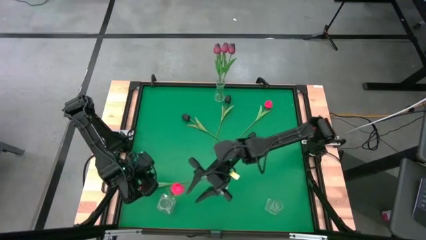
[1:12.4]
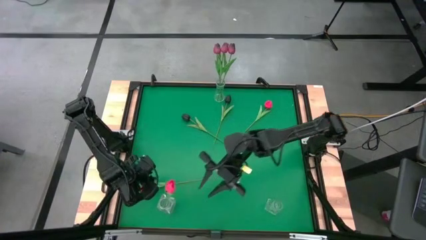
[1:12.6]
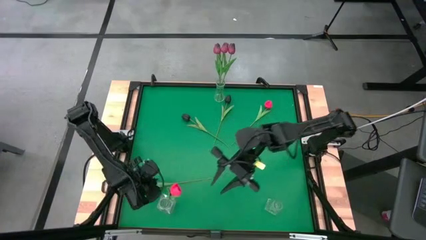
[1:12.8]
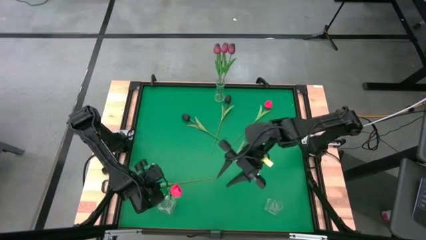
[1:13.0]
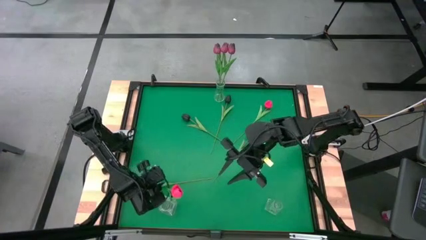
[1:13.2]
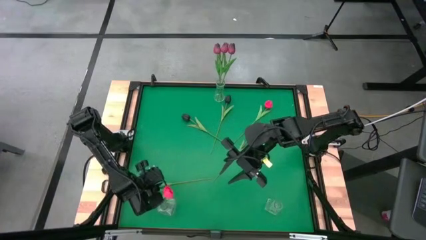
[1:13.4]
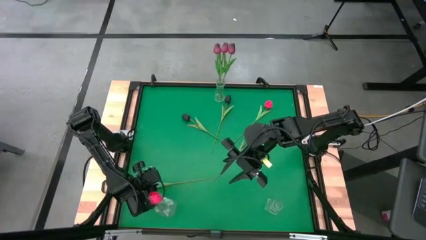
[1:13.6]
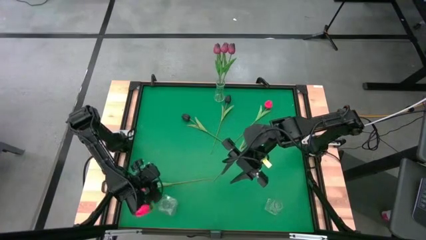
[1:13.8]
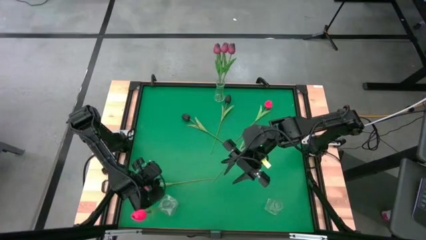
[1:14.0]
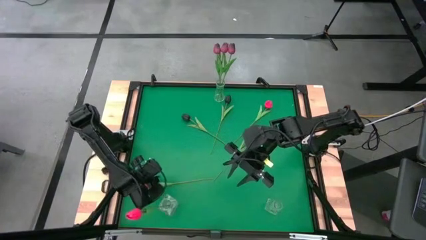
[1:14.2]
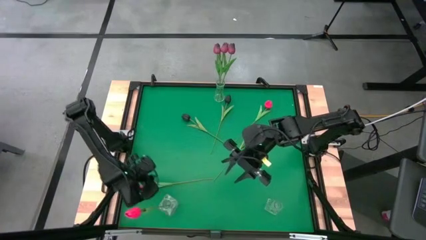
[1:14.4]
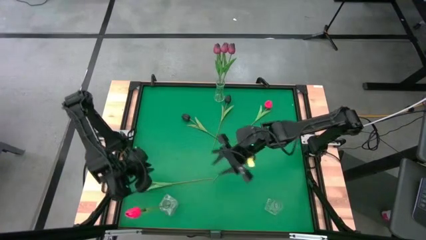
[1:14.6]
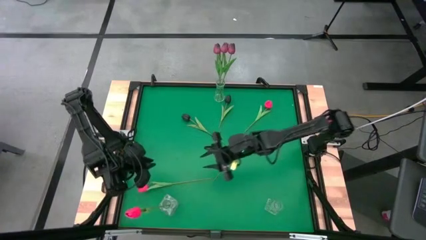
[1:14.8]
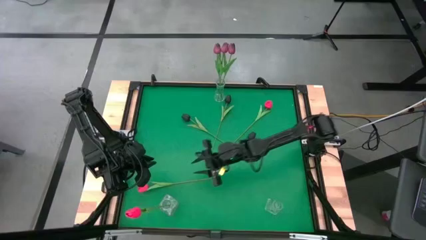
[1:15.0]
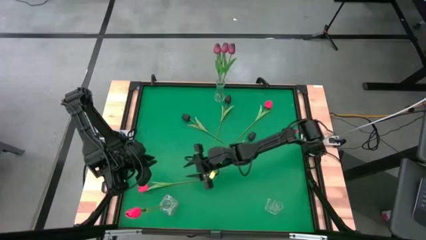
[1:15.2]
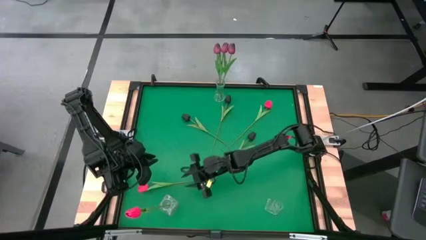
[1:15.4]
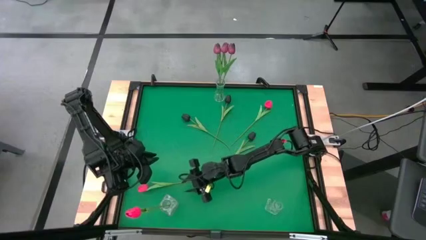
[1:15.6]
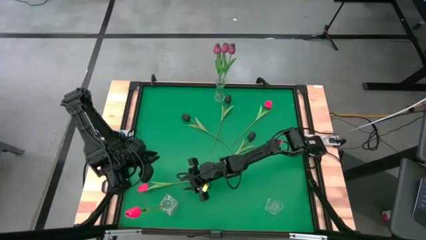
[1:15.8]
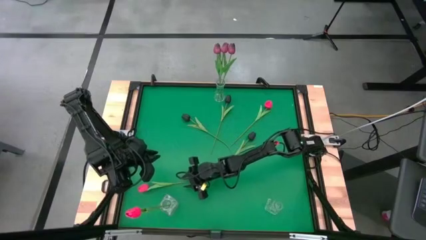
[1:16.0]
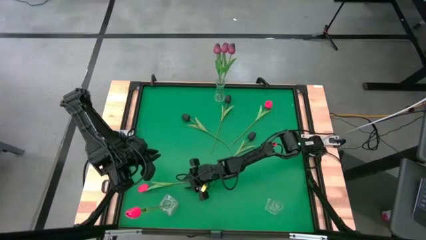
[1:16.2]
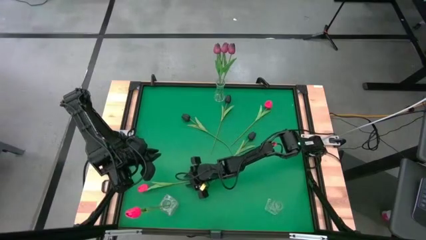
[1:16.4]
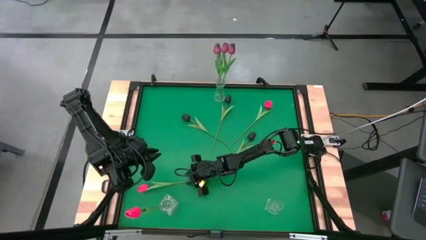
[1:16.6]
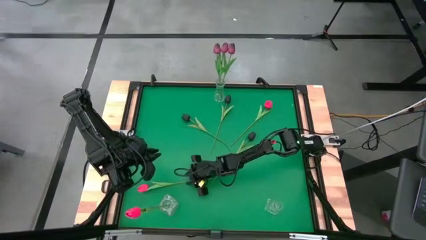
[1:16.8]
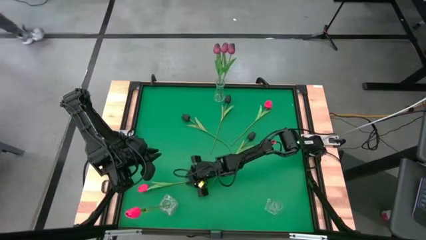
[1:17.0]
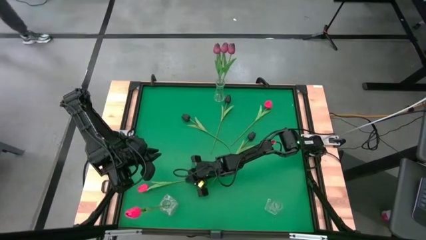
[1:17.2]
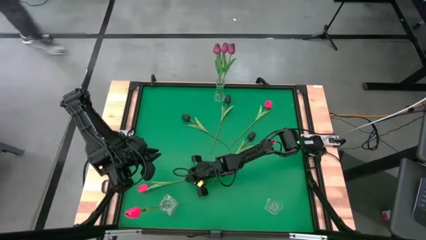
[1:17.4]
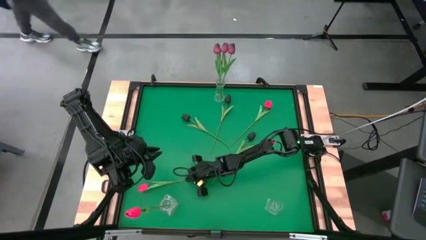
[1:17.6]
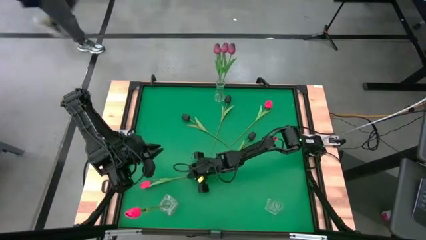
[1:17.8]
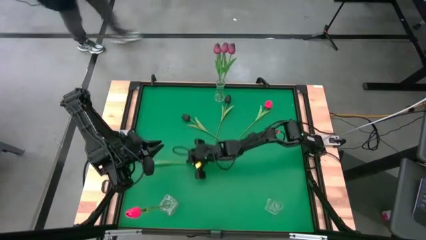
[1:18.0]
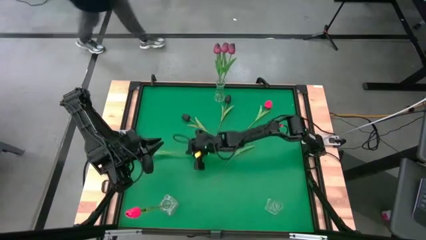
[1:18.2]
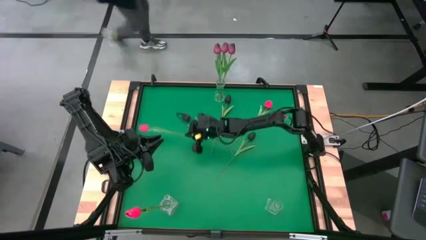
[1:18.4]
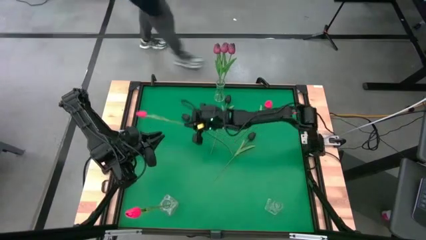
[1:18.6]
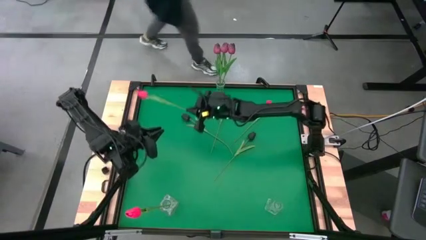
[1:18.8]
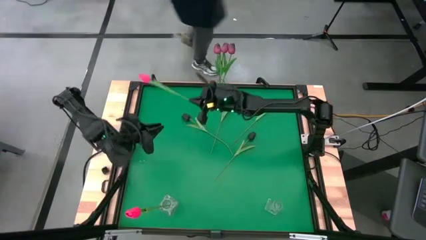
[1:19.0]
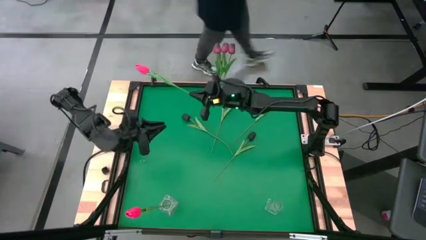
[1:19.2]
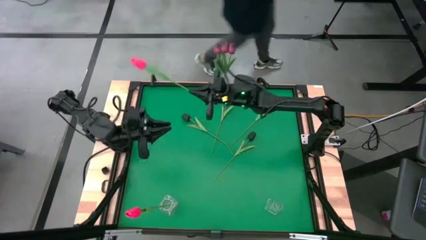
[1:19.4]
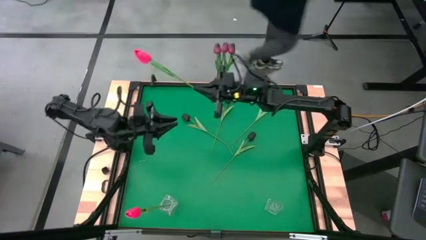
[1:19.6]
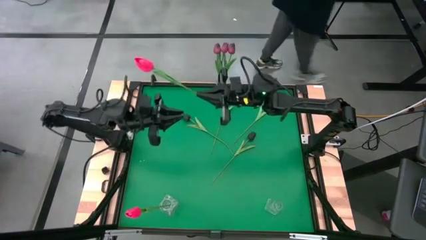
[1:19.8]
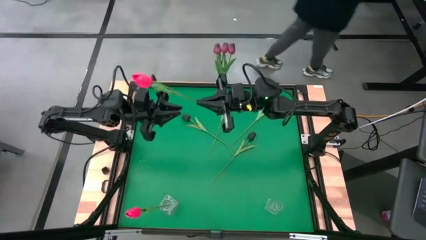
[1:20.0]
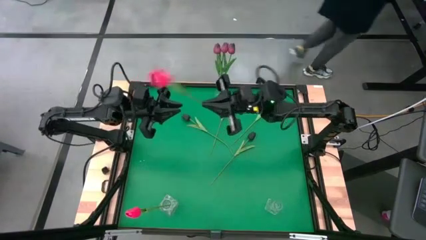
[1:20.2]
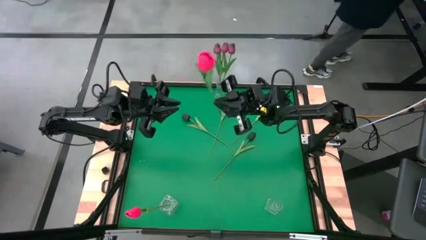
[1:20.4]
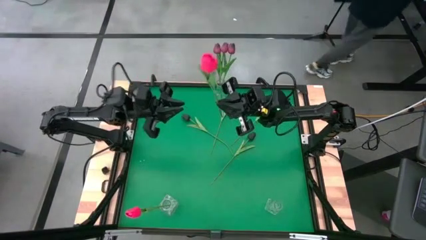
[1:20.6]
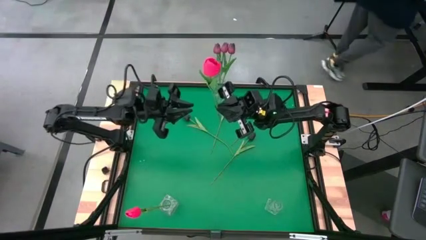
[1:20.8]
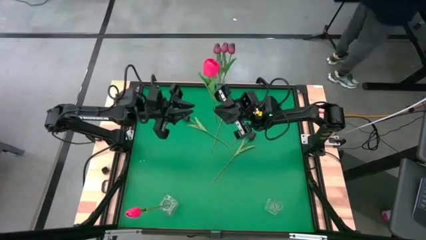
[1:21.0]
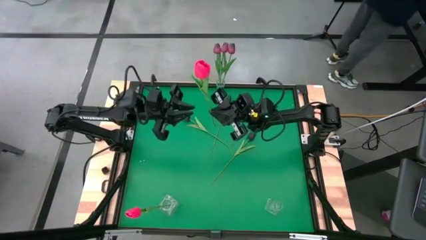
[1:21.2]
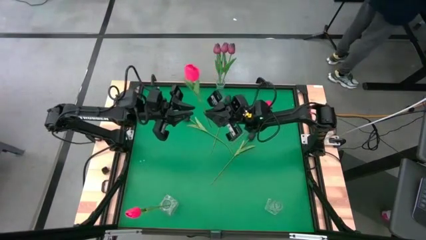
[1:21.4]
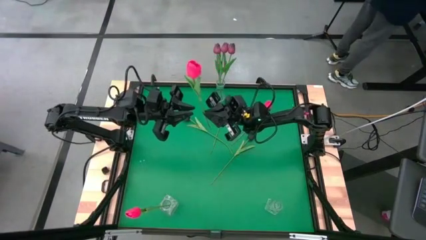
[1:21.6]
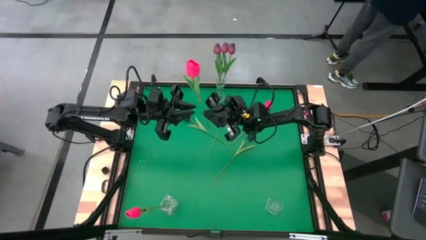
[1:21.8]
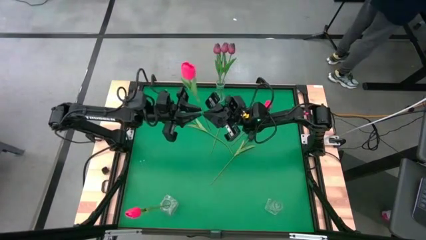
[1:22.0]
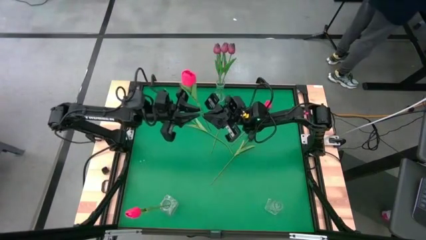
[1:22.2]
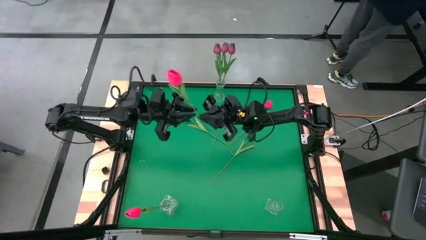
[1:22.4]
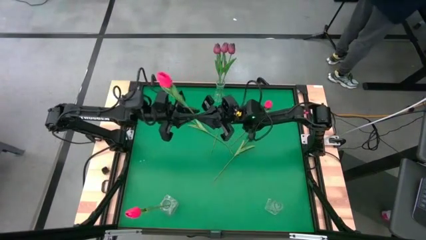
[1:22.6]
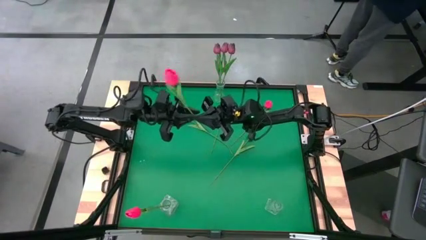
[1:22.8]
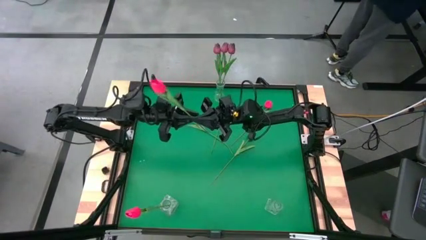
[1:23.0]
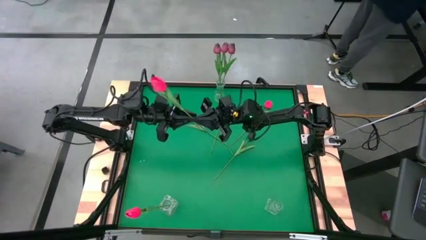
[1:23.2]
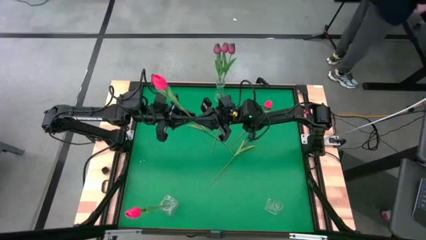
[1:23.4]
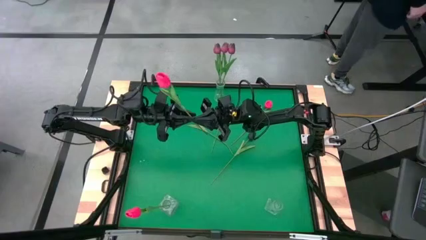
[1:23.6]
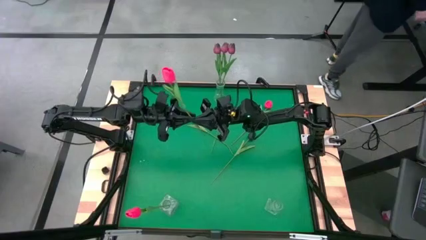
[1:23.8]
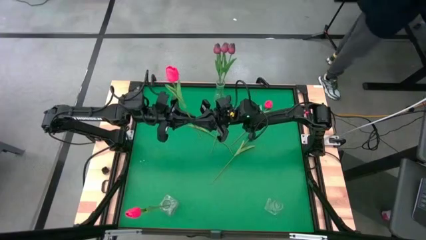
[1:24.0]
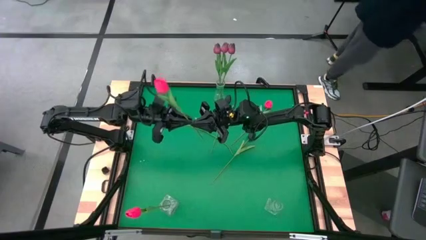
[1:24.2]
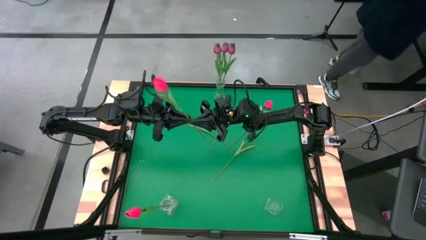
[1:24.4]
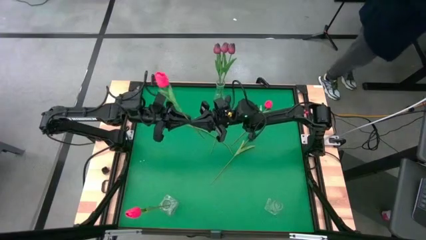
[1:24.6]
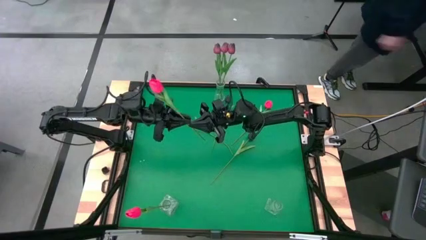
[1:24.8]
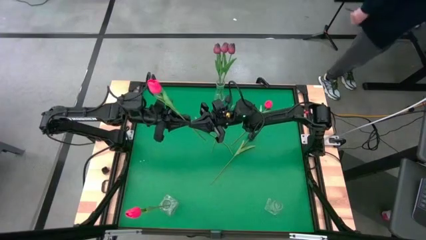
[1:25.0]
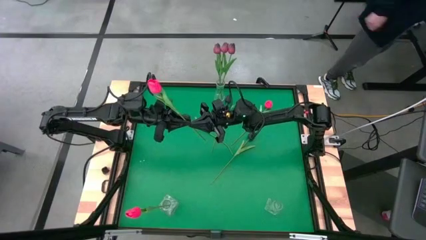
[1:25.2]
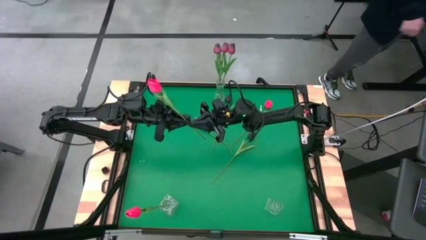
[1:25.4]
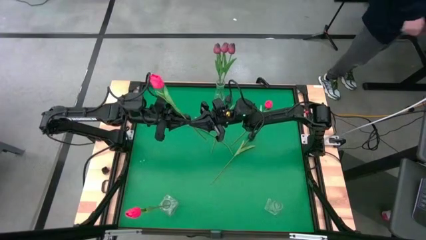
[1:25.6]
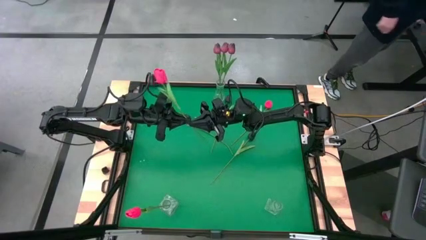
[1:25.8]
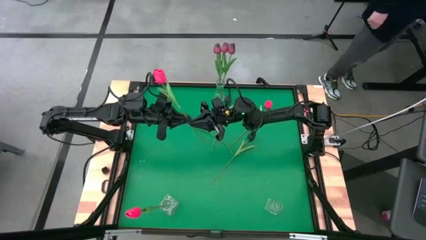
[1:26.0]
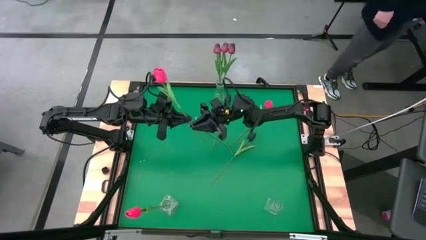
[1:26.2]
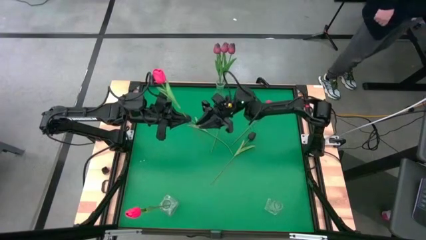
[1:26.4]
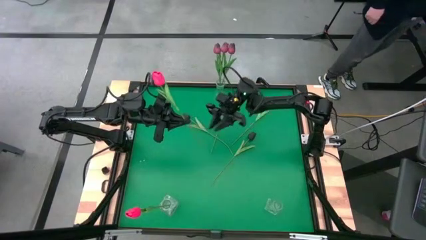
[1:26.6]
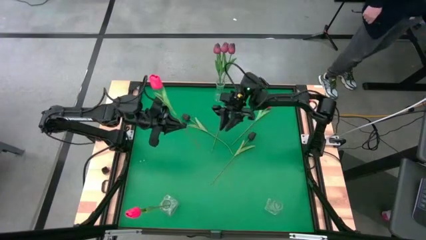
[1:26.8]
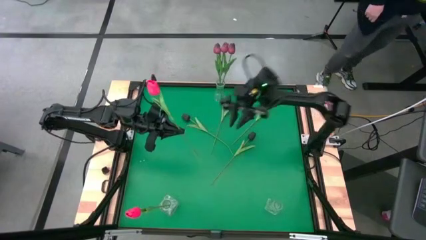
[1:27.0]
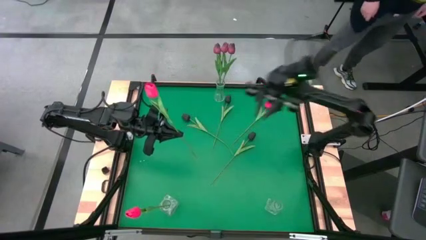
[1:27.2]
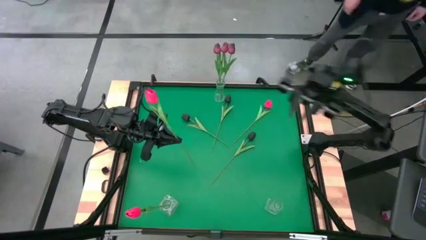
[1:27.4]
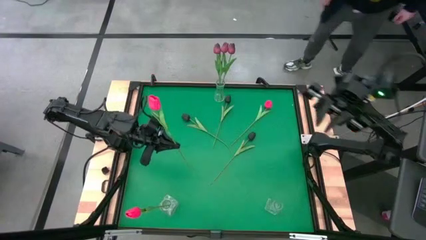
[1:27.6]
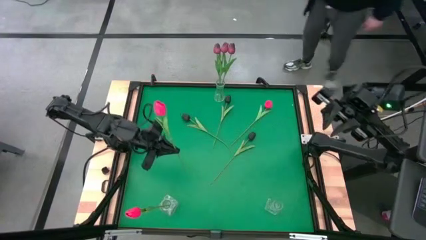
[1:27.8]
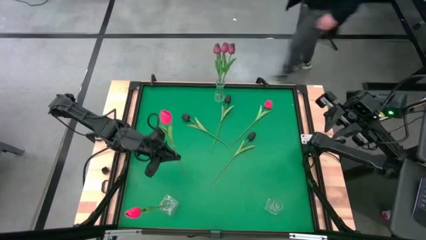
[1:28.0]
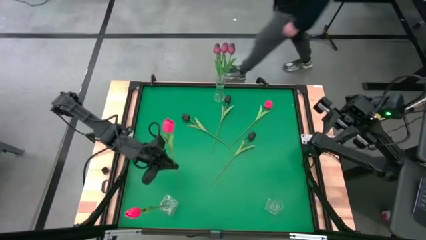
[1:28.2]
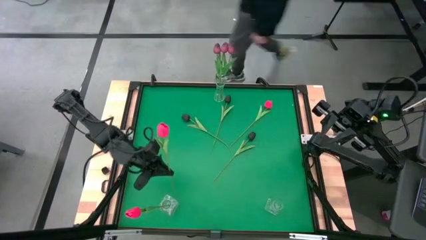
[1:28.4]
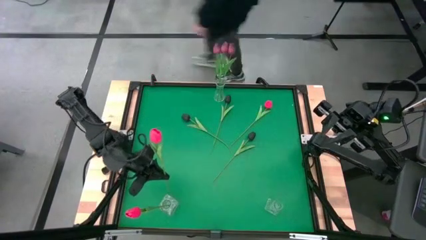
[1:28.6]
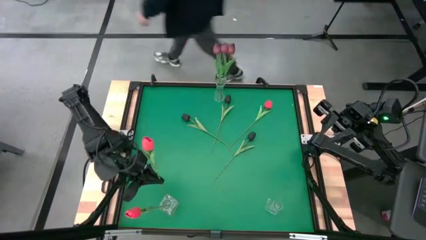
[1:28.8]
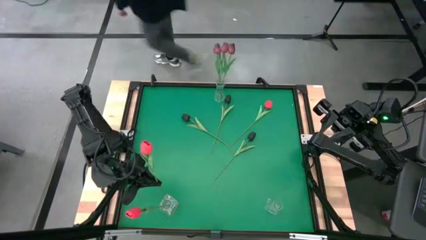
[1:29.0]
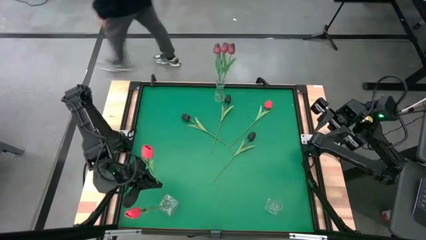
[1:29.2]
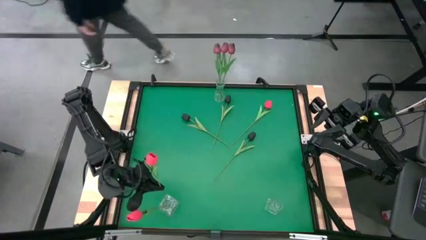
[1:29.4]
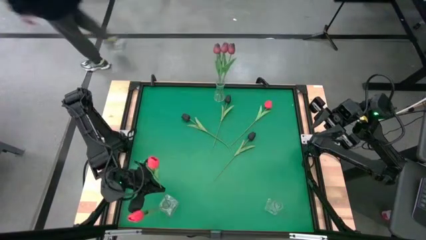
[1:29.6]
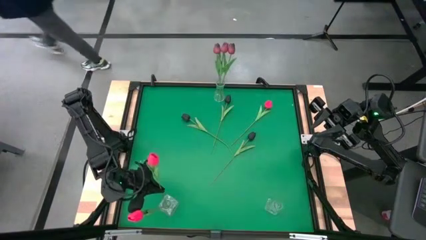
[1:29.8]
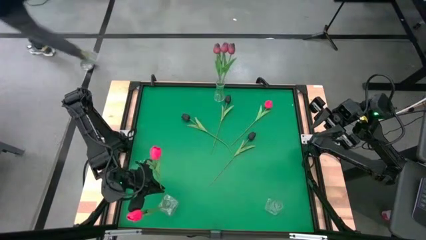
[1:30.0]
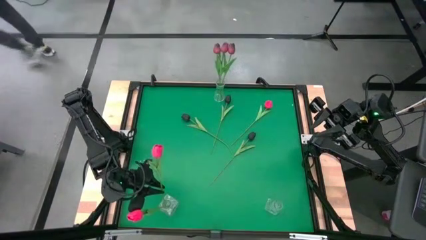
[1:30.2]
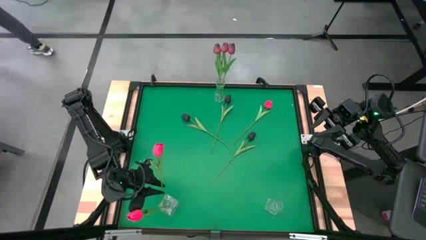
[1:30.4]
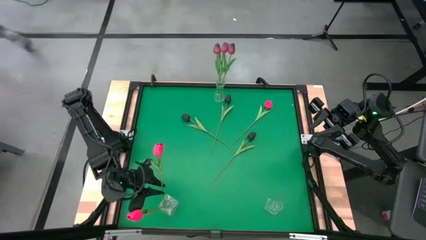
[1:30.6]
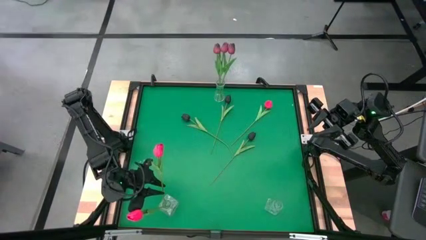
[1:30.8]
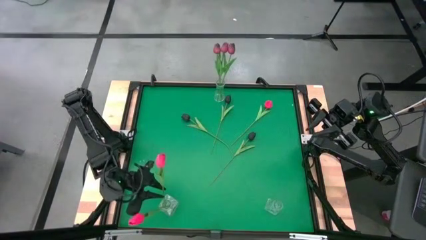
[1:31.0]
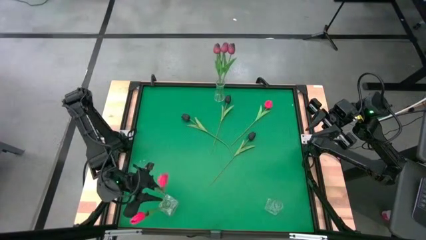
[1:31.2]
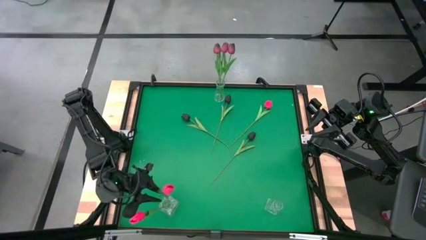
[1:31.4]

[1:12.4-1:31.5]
Task: Sort flowers into vase by color
Put the bottom red tulip into the bottom left transparent vase
